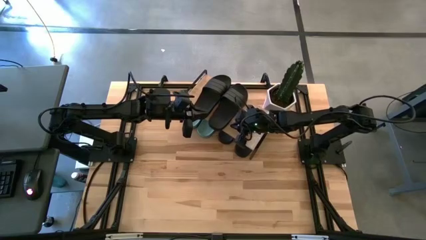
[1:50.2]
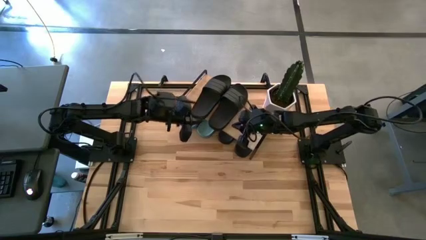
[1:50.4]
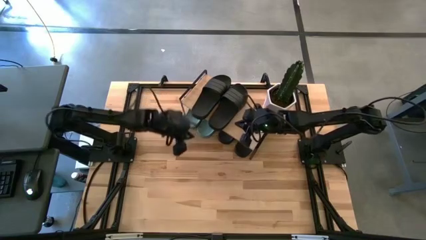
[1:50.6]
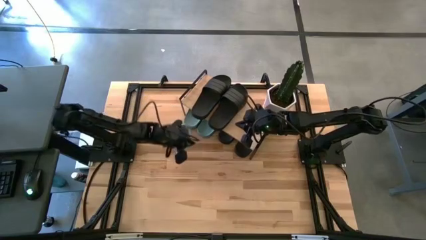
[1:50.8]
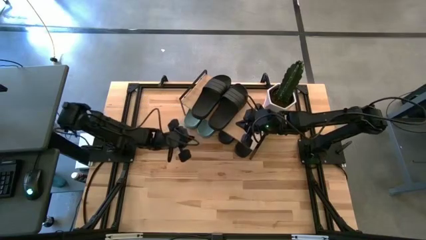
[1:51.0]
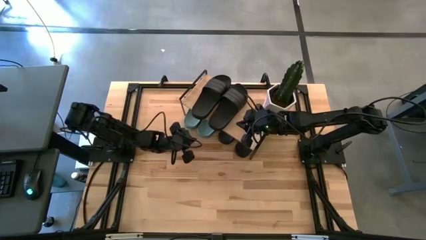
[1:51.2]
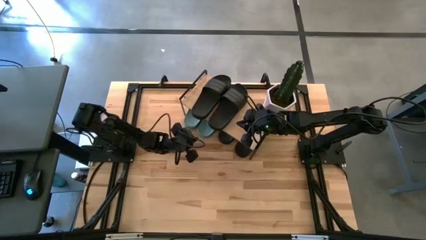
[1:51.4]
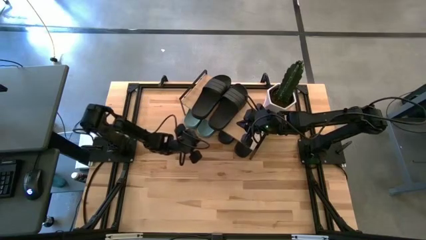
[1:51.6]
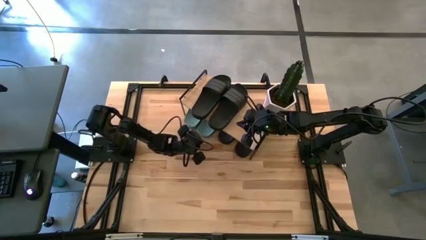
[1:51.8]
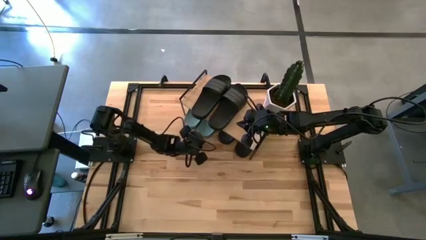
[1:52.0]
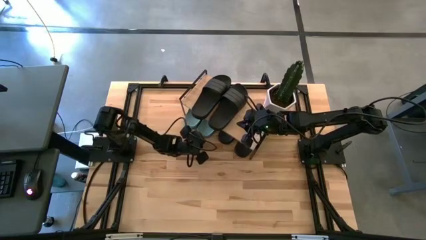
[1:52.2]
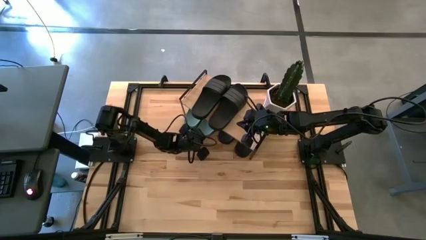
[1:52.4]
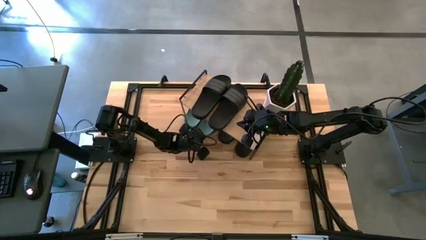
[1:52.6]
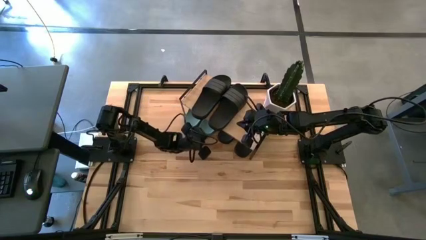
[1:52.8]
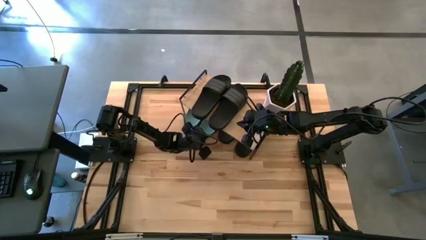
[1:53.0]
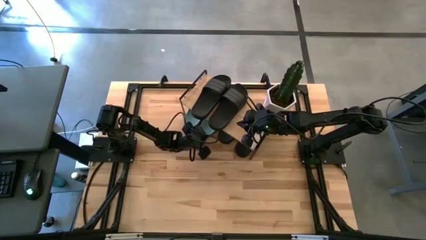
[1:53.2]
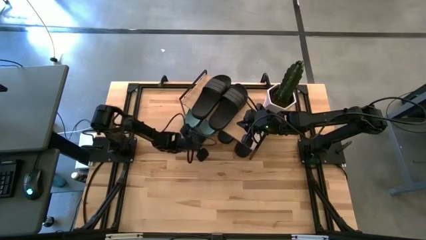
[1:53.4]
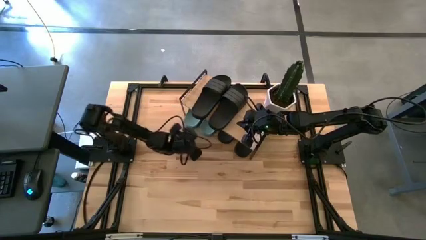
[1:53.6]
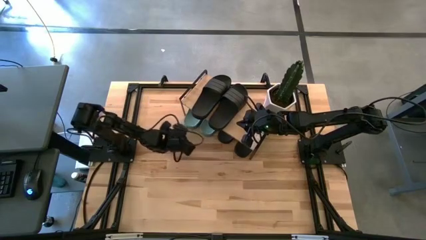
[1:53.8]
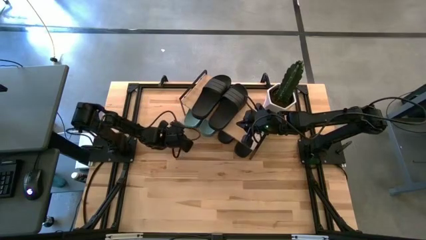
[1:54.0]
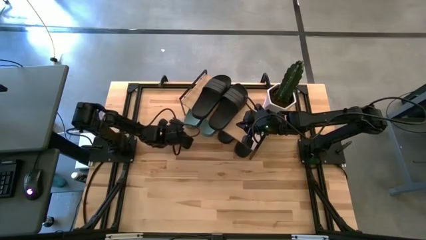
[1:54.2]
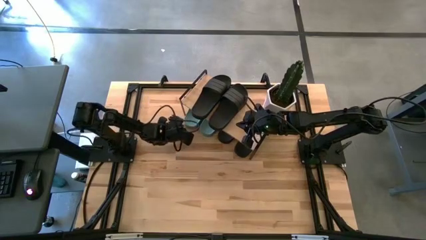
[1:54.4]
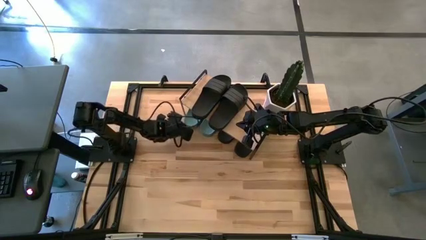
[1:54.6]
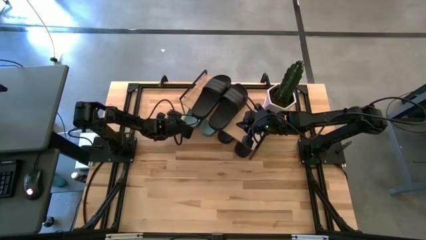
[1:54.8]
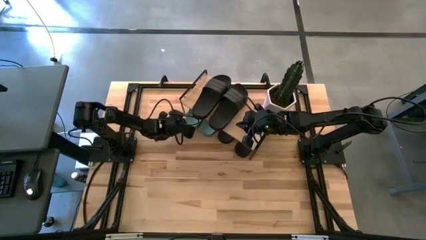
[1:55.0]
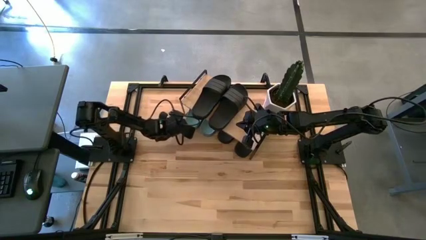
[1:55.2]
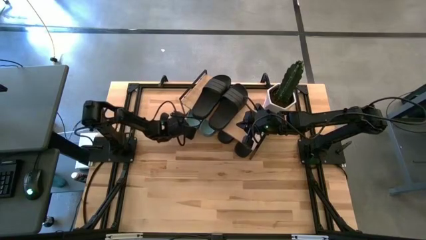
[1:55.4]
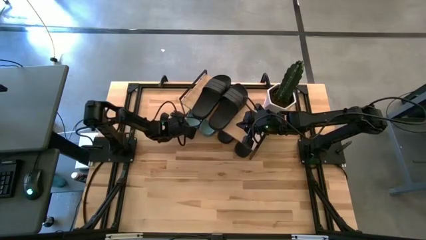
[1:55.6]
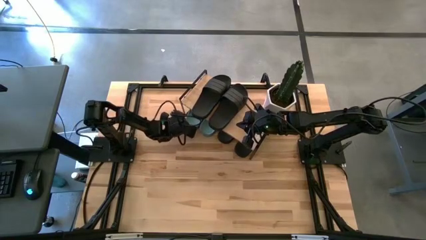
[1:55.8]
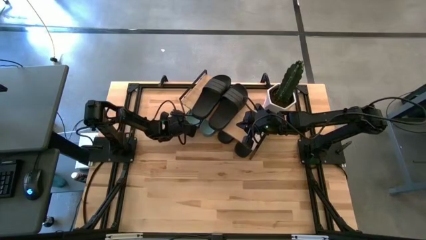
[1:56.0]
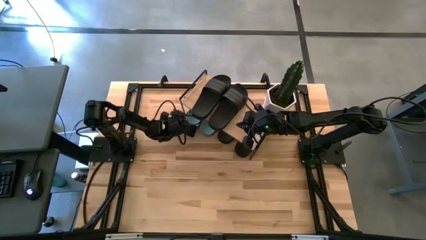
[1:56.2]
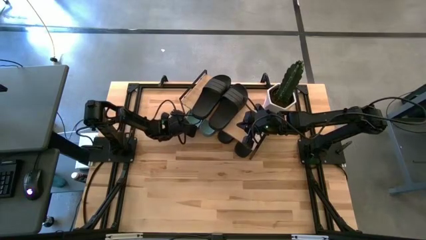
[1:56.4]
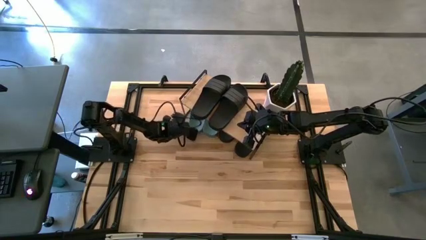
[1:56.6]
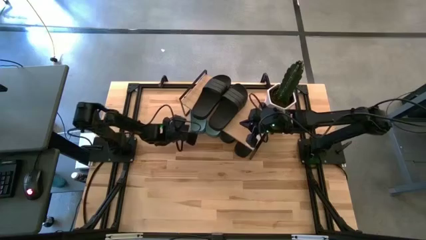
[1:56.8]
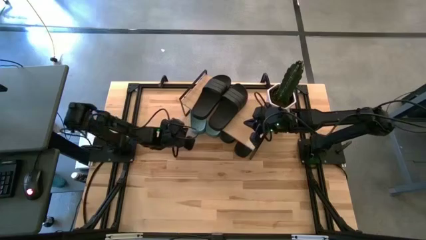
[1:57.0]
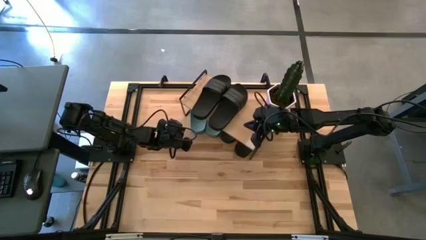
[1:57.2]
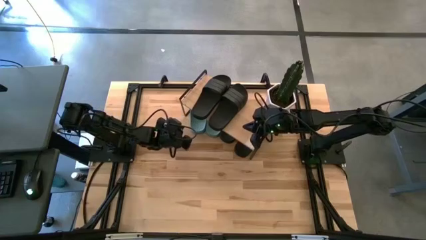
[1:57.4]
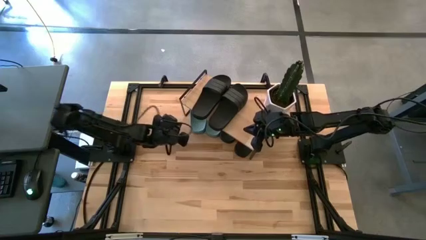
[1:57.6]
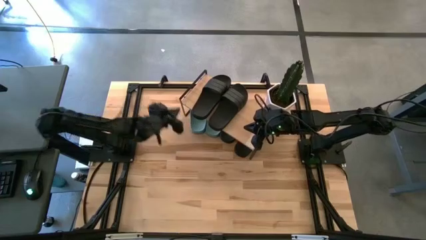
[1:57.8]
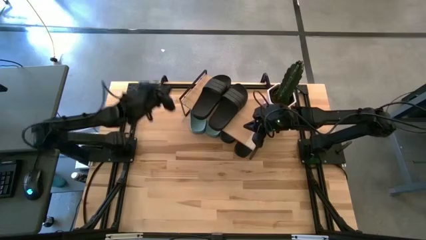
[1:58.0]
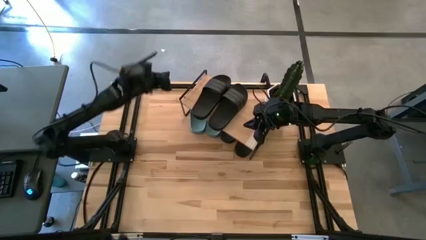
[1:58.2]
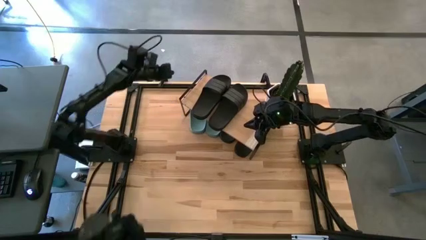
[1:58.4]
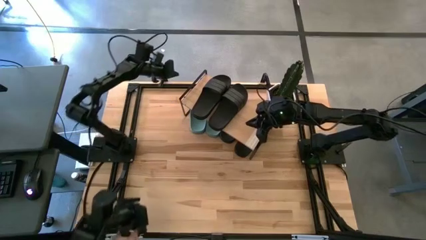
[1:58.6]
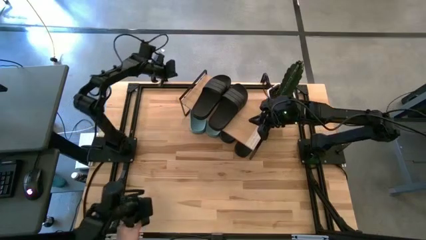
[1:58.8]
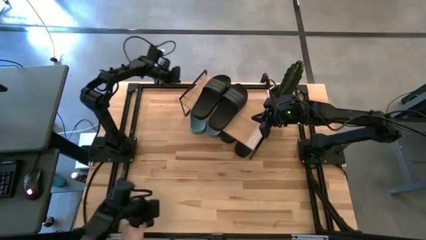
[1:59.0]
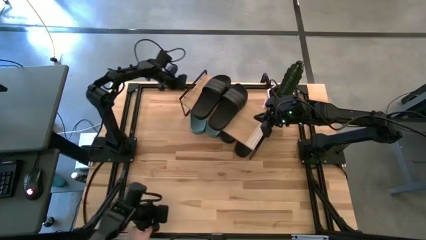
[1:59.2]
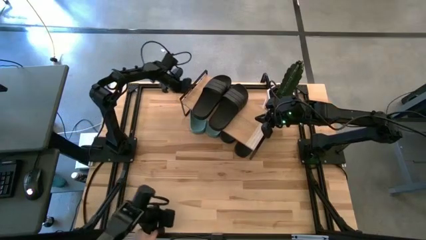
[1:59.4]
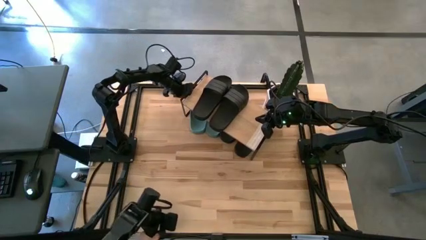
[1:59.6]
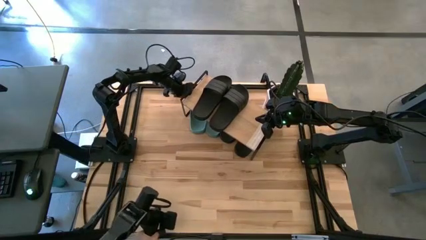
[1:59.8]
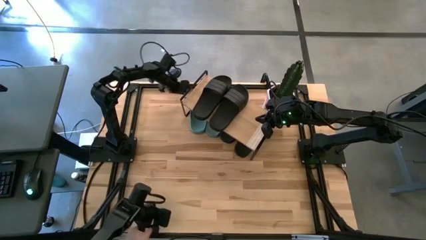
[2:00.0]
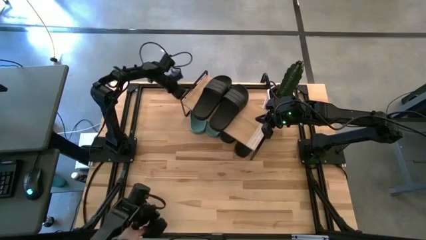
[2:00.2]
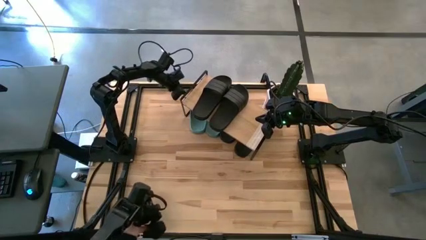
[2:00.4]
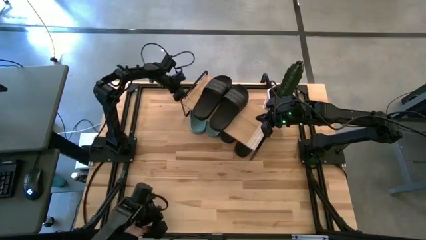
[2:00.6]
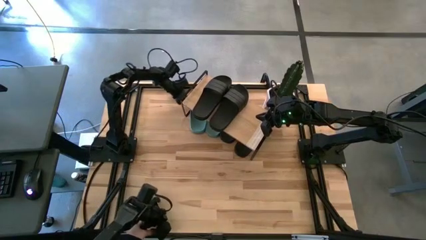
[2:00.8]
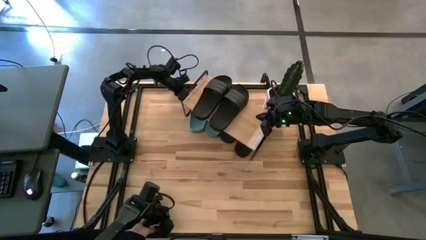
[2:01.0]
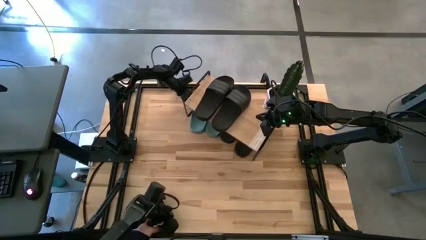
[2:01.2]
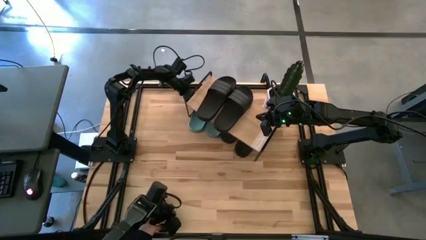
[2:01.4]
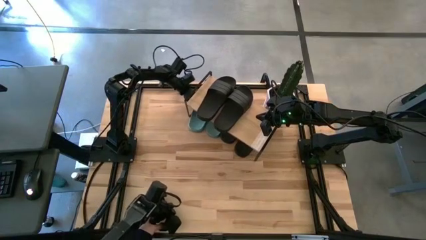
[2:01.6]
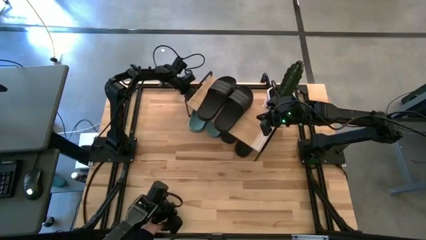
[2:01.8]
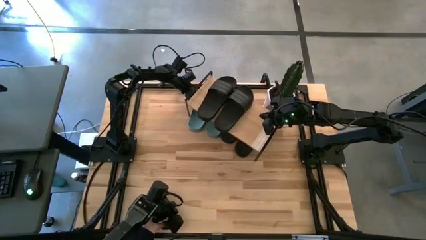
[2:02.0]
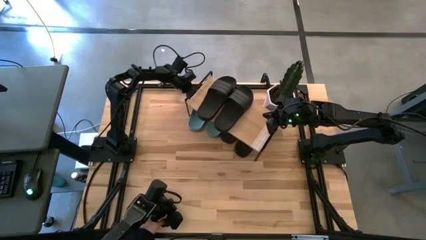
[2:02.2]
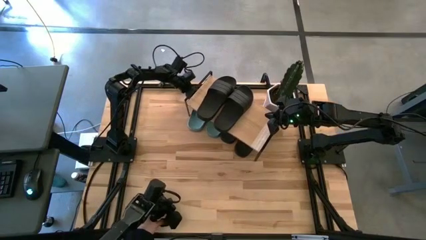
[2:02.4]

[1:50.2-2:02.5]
Task: Pick and place slides into the shelf
Adjust the green slides under the shelf

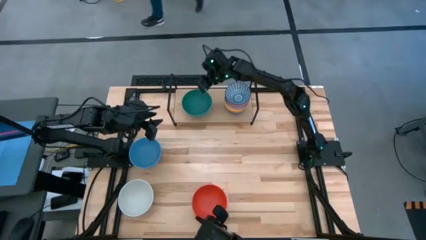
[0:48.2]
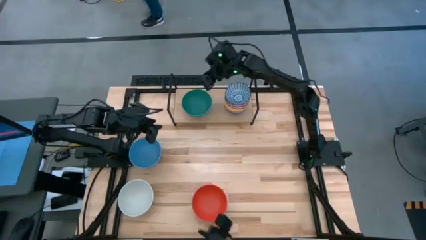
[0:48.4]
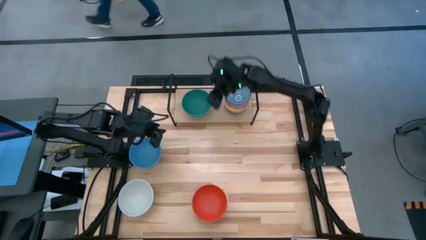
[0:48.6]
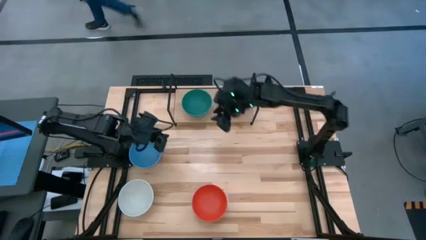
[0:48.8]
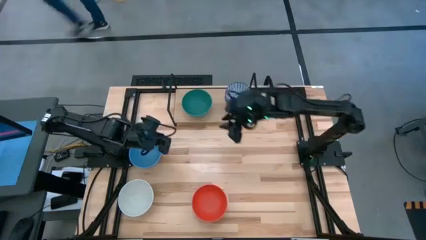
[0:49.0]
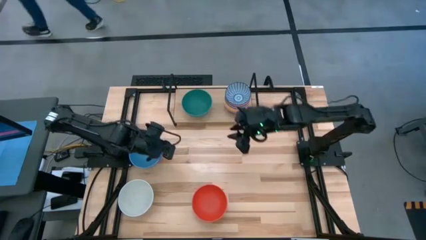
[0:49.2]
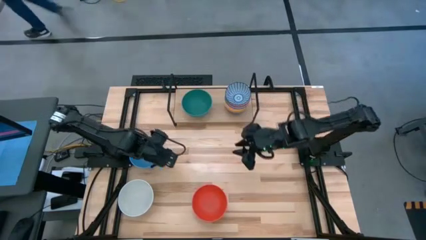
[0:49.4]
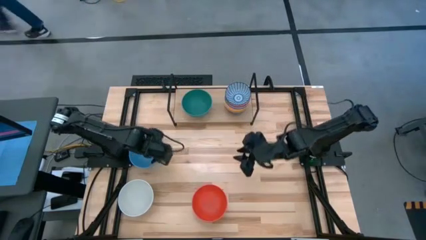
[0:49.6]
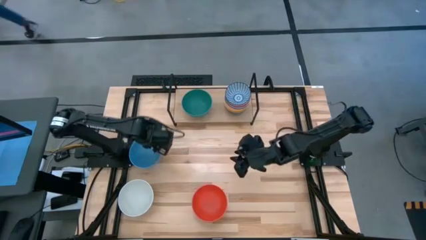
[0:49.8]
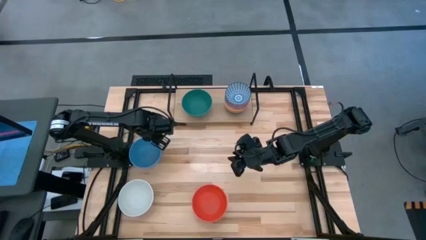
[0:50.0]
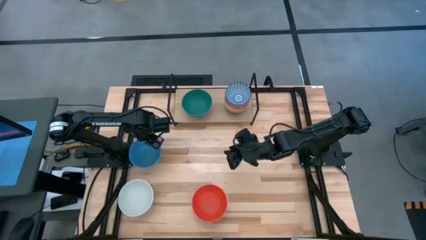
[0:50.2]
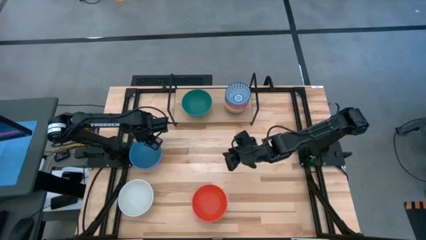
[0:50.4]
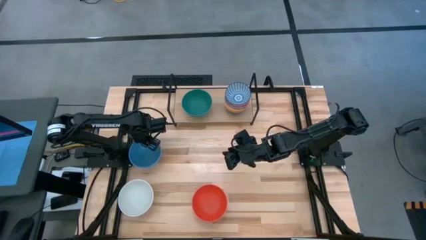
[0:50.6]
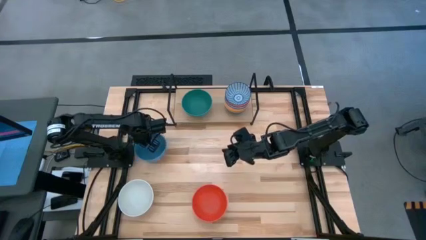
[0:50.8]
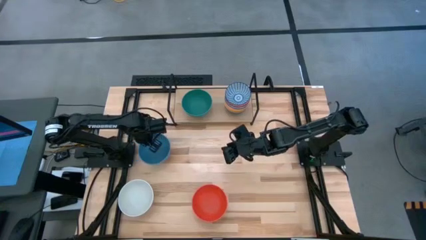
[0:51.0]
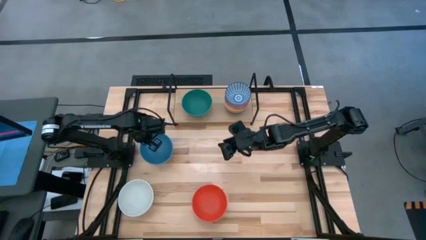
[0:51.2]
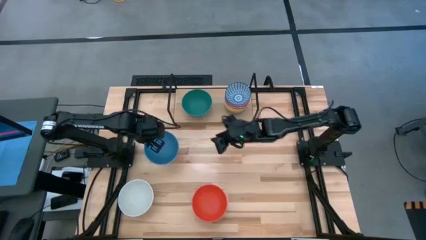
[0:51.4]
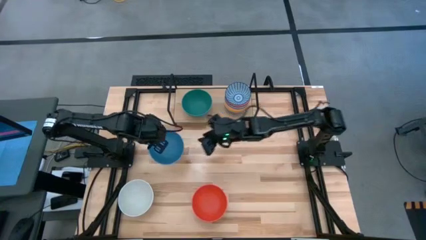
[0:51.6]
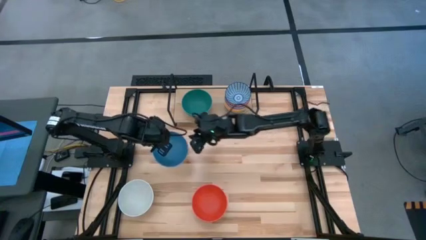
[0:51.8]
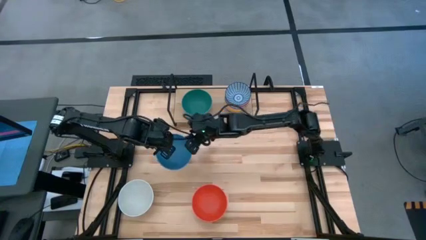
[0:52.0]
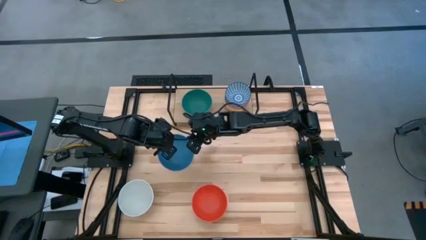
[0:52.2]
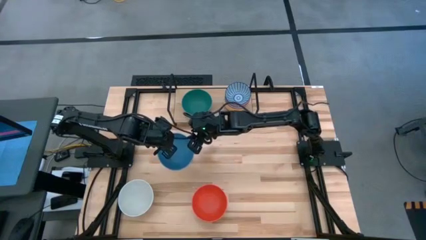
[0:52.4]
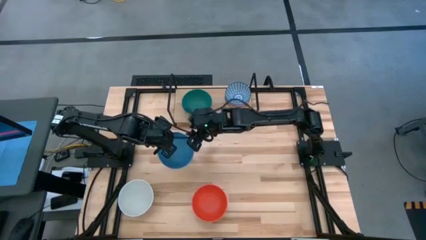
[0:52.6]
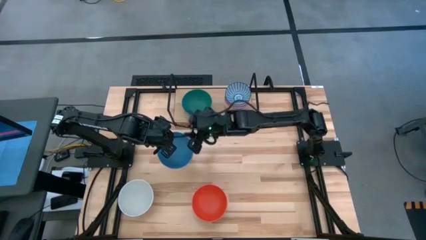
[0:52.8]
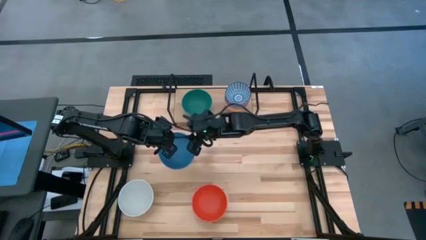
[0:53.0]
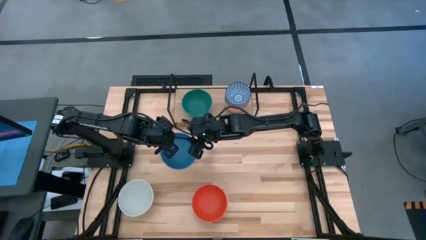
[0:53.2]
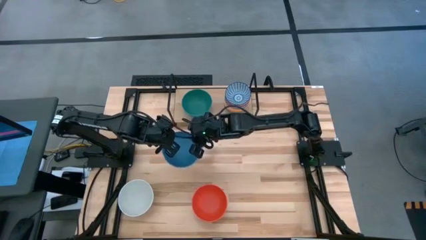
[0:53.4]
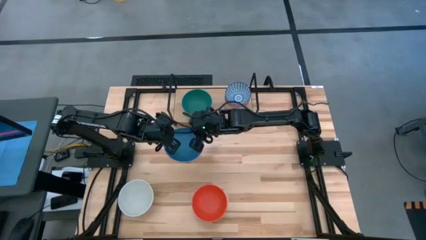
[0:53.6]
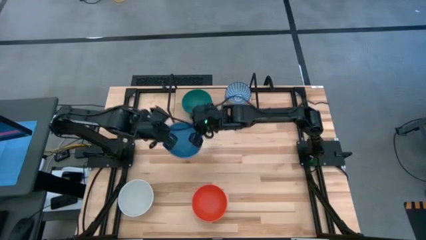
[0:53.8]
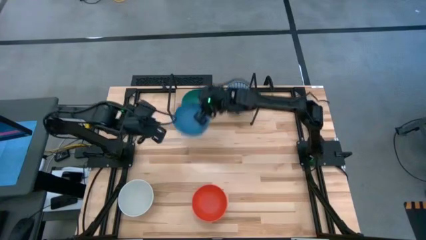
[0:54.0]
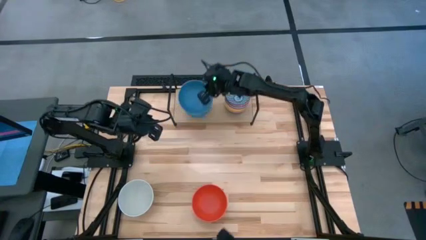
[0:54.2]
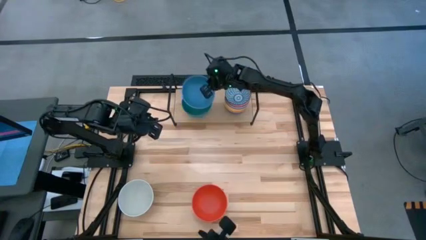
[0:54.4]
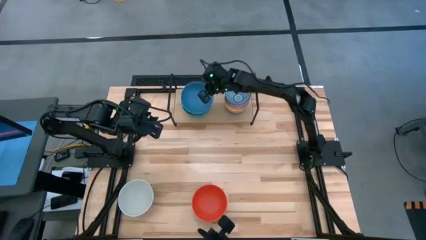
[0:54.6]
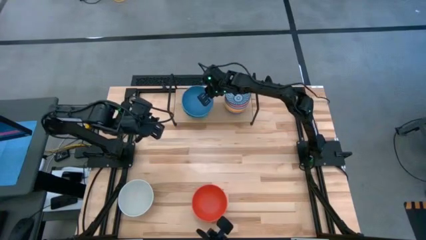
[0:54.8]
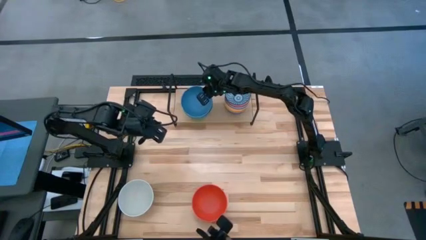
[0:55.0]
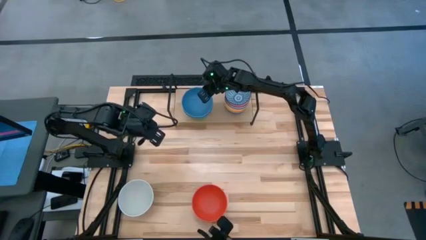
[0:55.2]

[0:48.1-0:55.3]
Task: Place and stack bowls onto a shelf
Stack the blue bowl on top of the green bowl on the shelf
